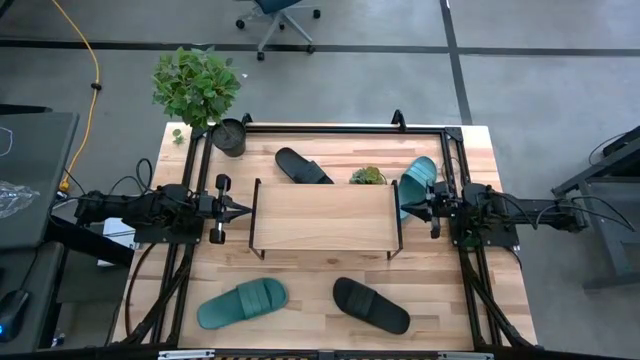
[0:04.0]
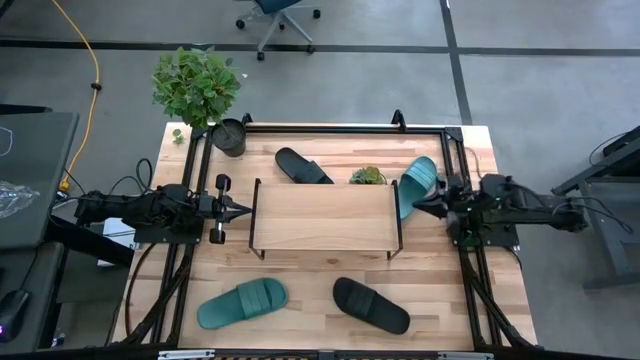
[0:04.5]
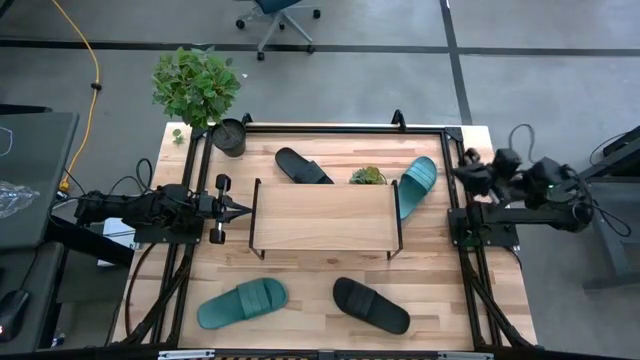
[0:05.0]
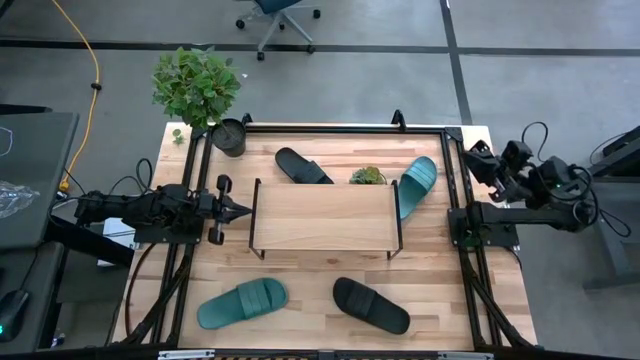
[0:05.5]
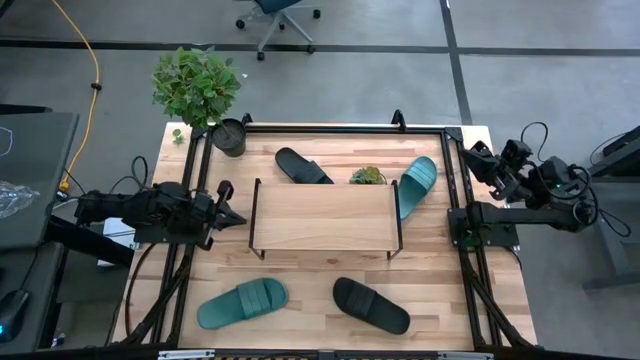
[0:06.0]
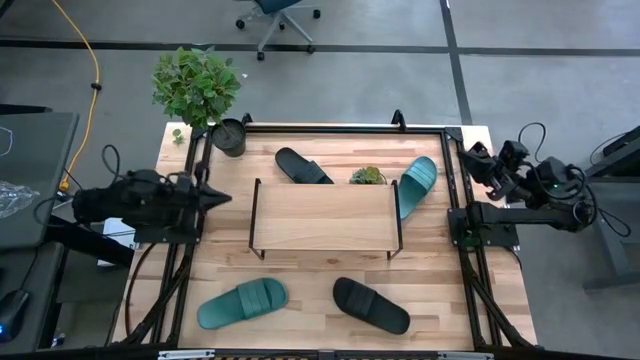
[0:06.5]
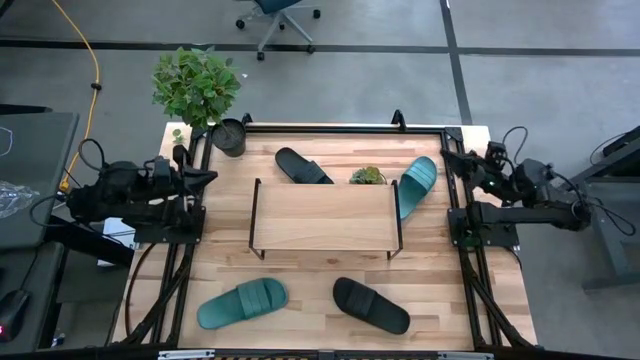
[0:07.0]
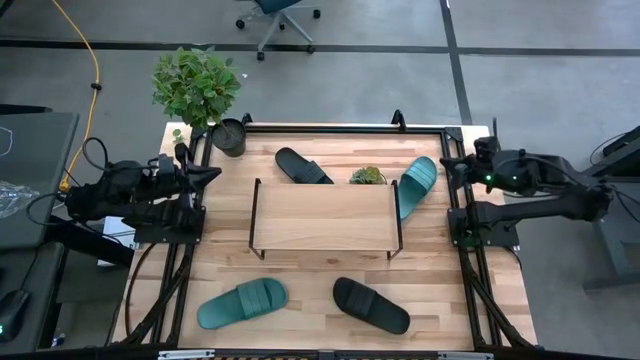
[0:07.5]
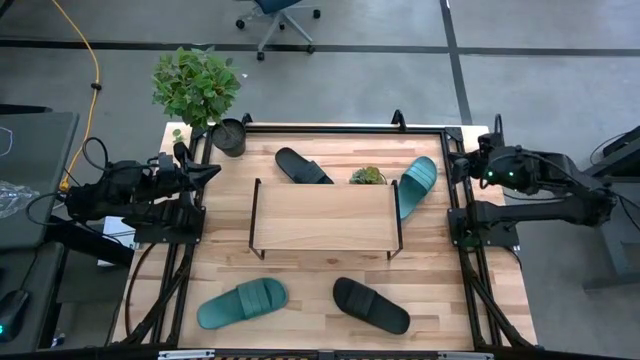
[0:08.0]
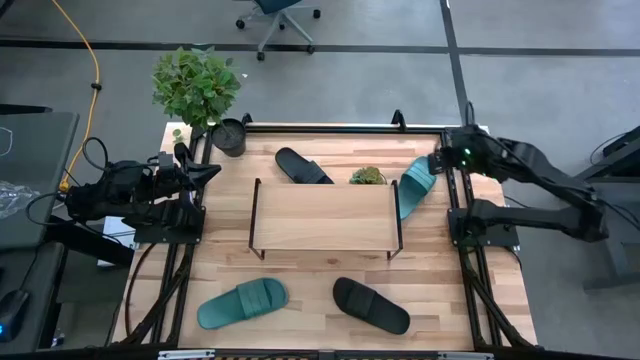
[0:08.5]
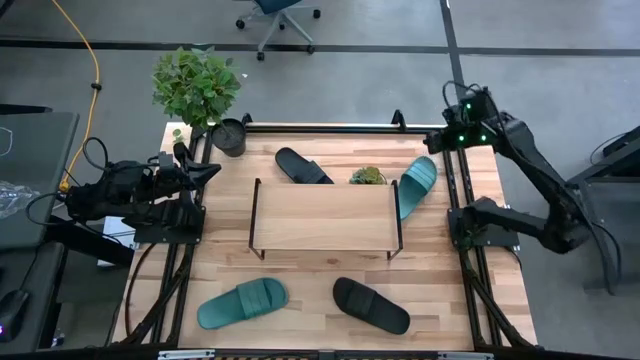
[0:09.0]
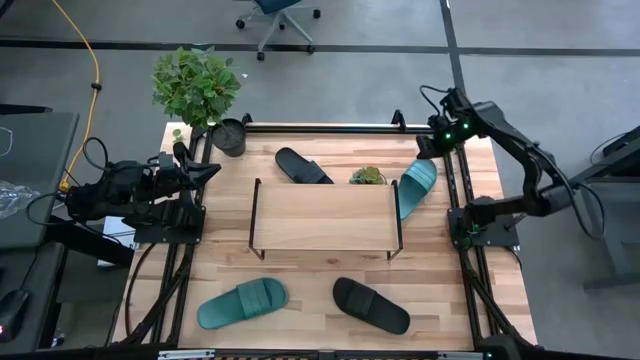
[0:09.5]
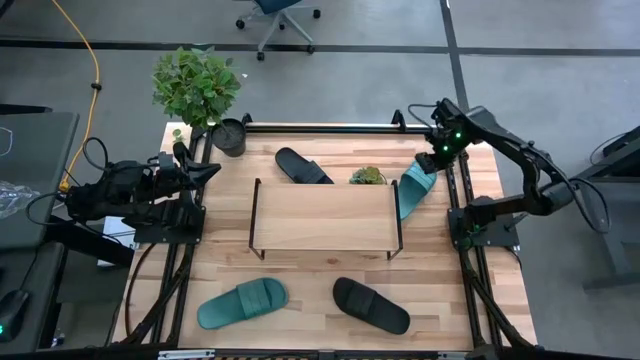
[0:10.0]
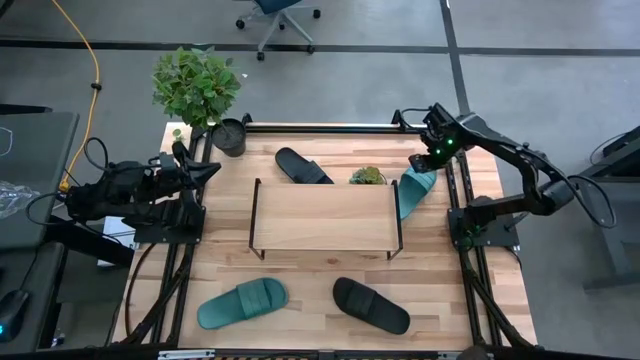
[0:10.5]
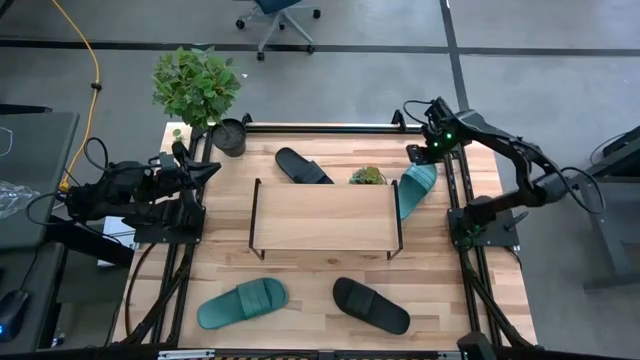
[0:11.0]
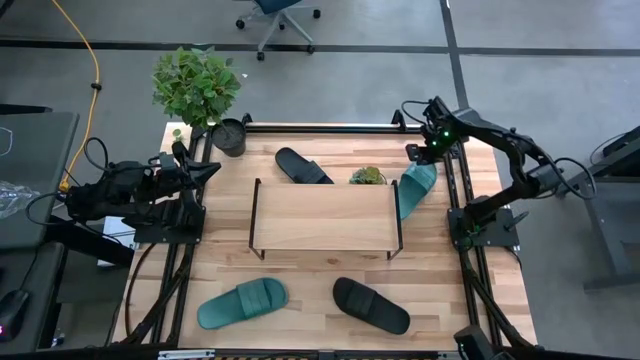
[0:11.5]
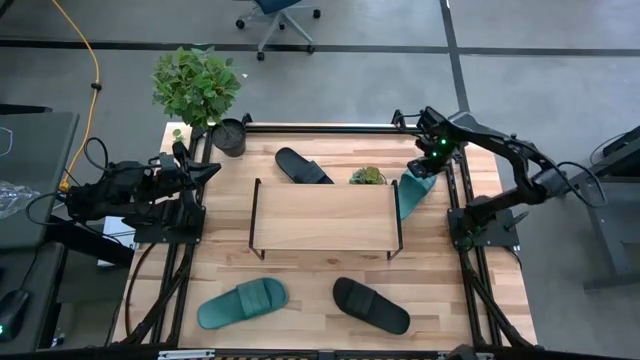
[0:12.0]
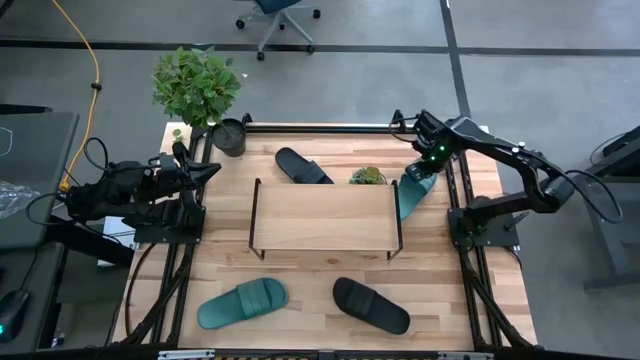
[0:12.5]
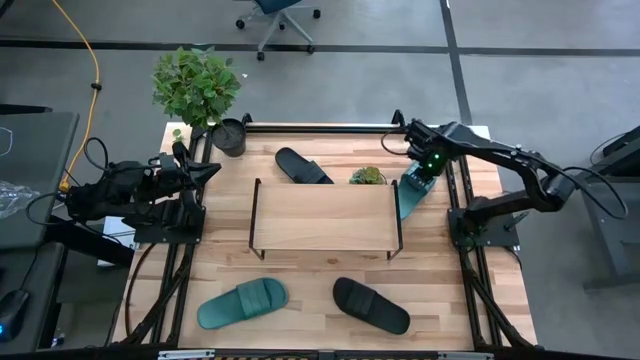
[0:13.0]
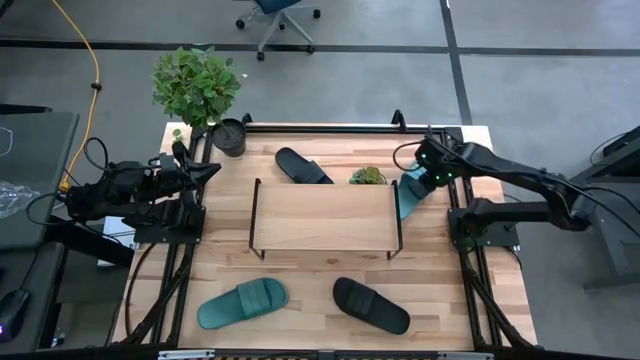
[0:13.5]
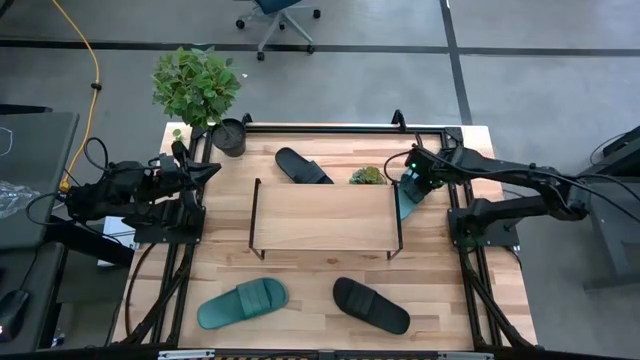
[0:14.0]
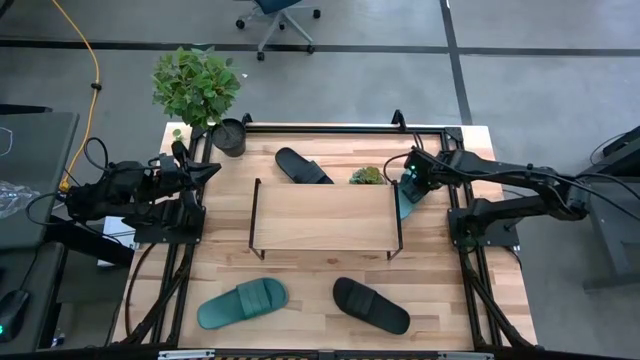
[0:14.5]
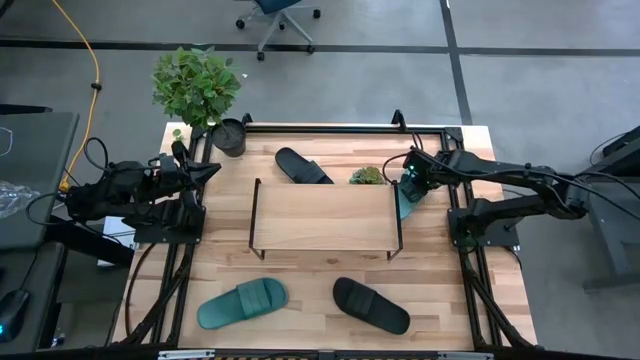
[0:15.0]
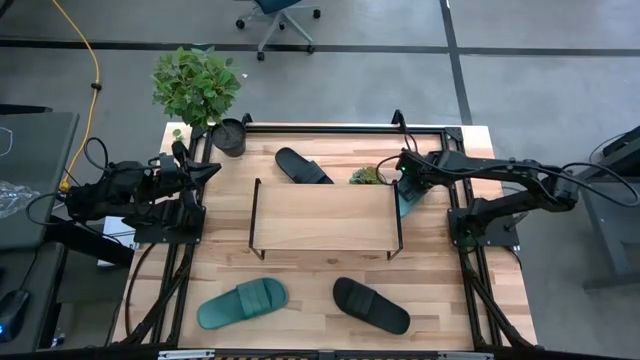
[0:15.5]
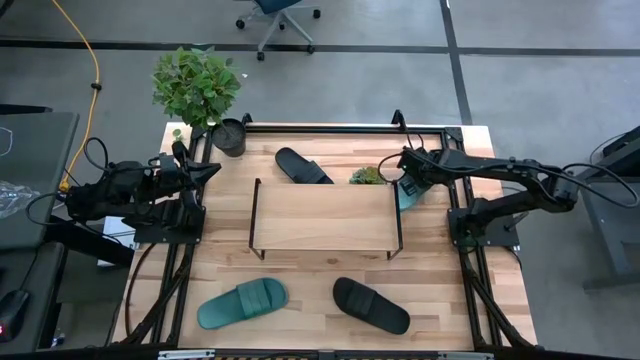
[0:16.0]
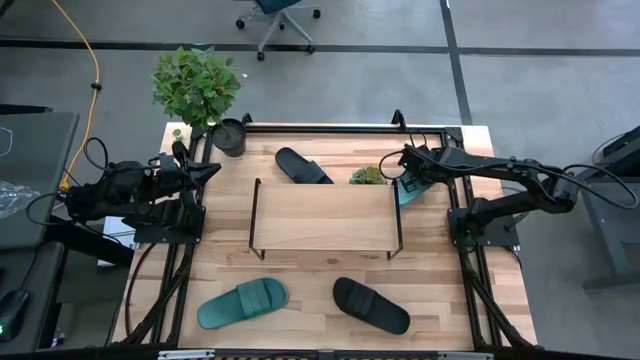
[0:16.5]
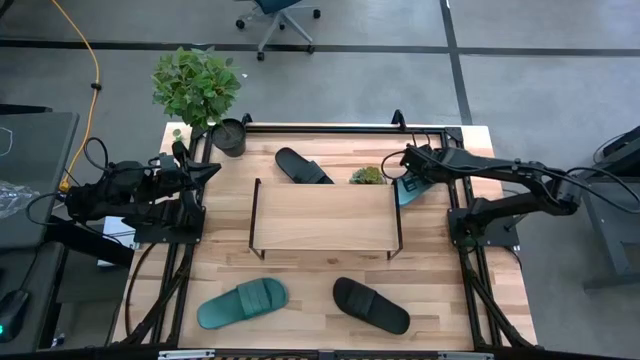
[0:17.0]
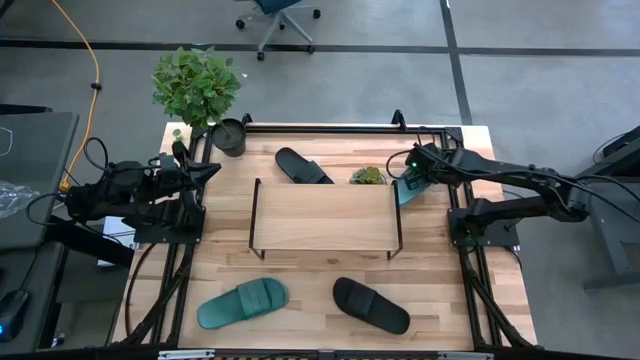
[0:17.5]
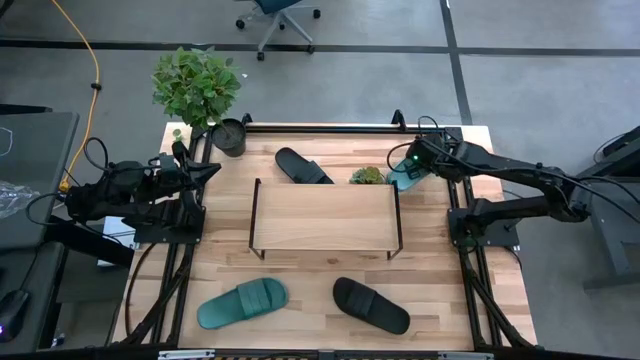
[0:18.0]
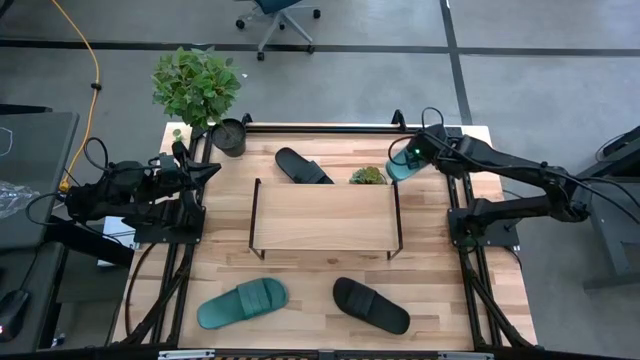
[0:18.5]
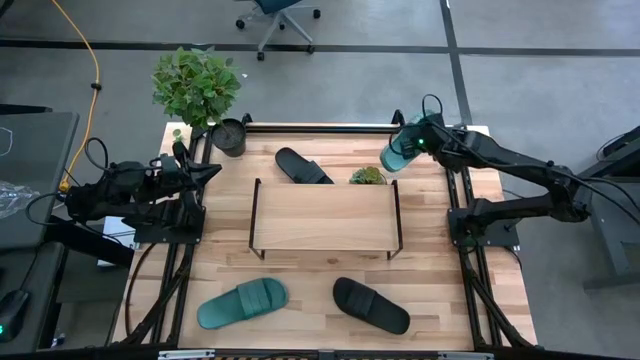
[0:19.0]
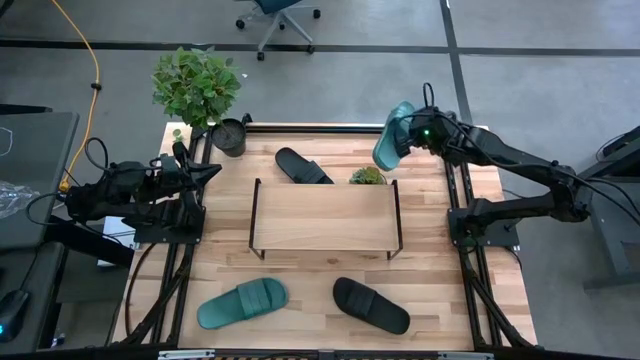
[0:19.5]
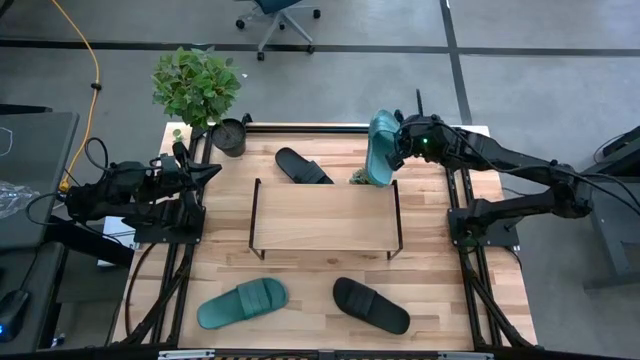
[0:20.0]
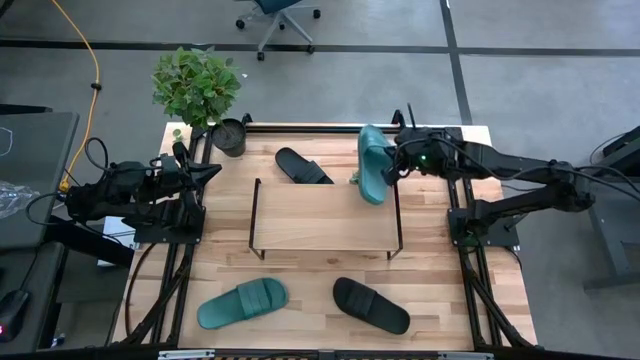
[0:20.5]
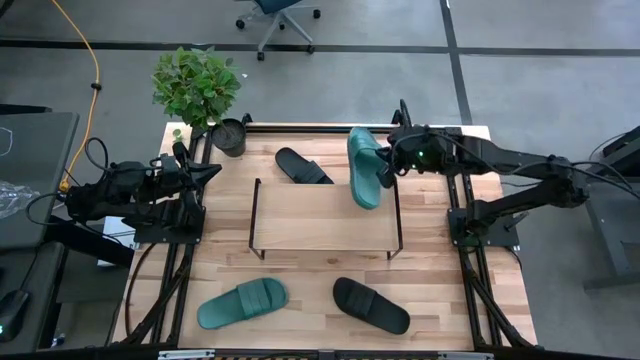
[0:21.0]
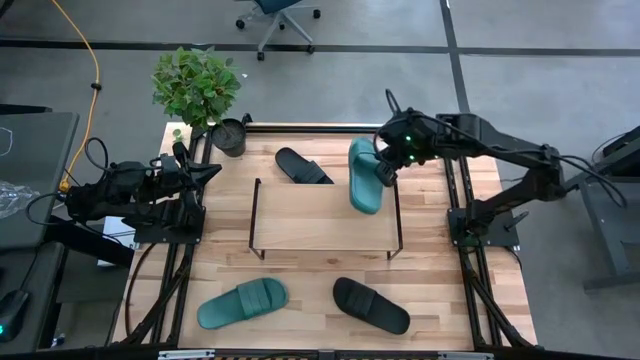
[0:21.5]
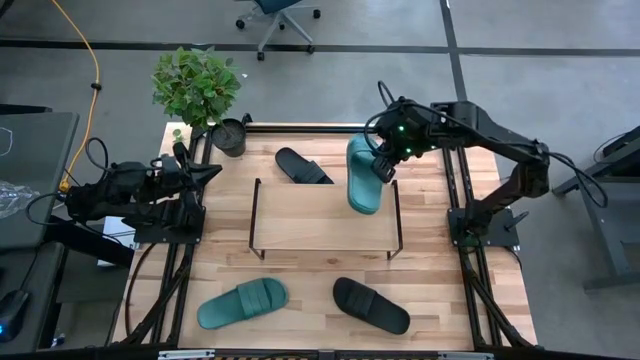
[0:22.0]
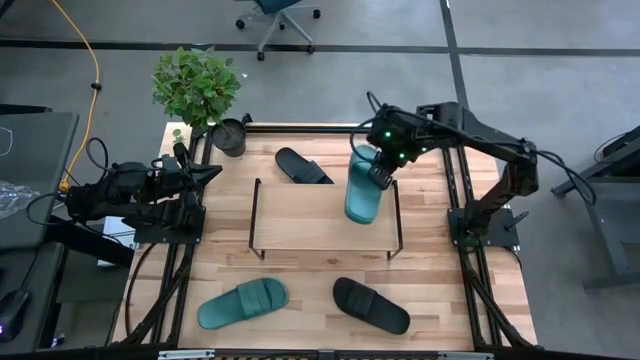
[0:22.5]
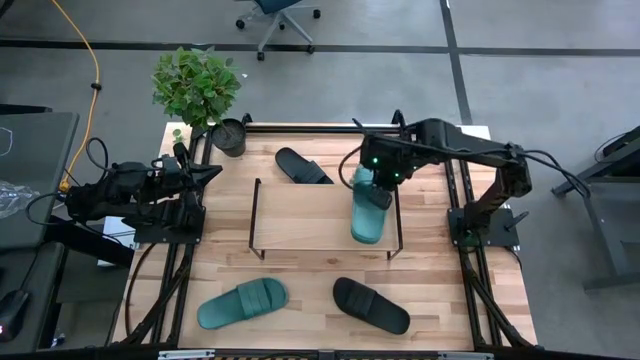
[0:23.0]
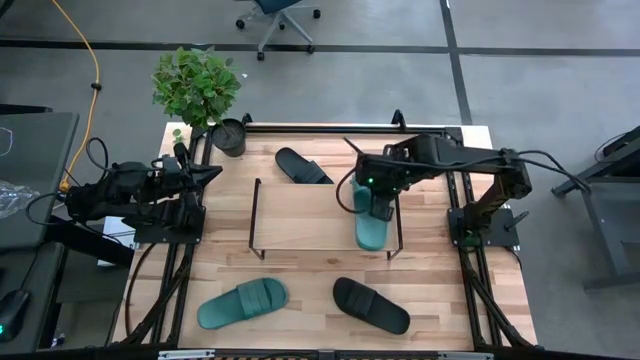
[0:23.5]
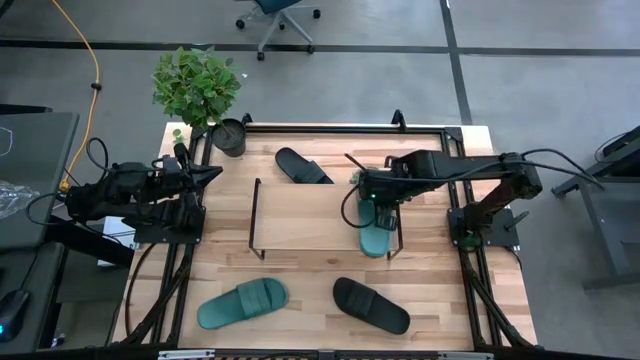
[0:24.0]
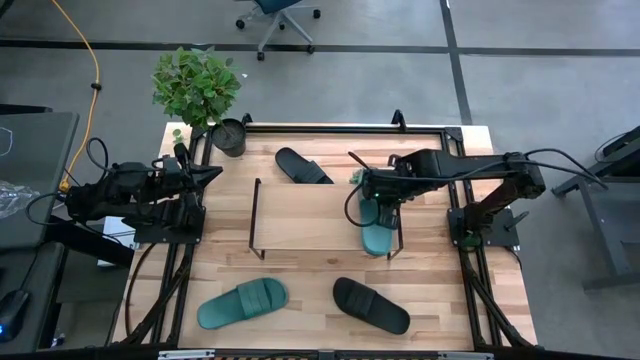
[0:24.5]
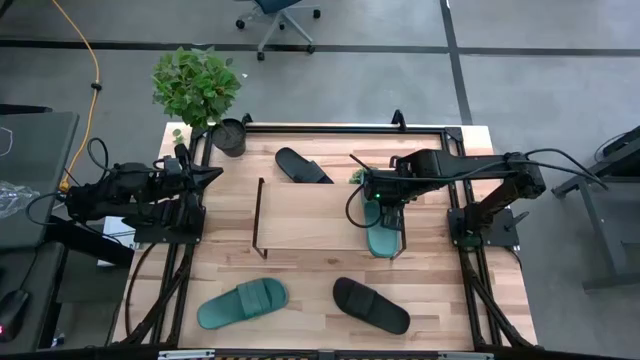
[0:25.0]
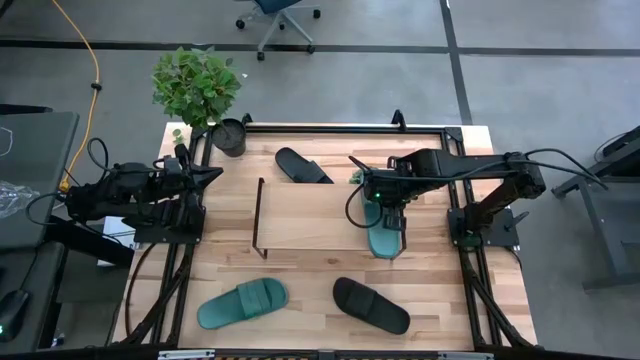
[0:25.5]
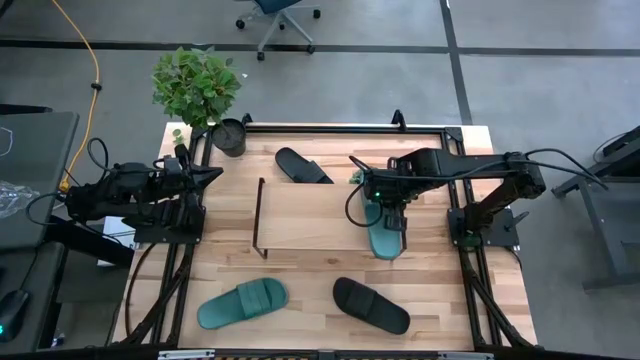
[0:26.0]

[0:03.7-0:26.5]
Task: Pick and place slides into the shelf
Put the top green slipper on the shelf
